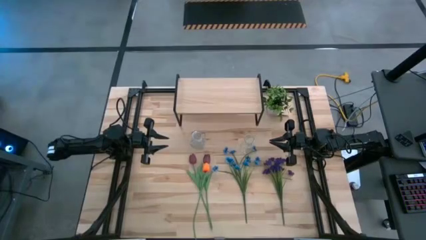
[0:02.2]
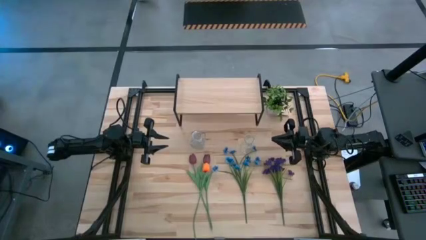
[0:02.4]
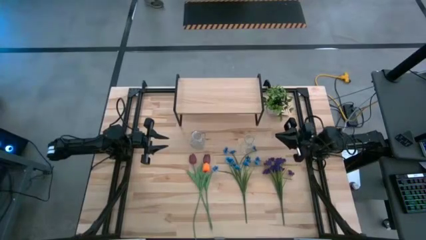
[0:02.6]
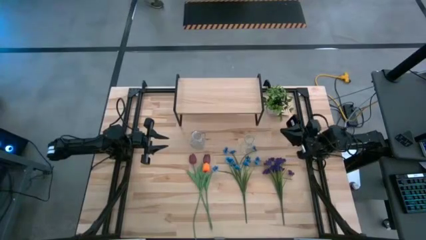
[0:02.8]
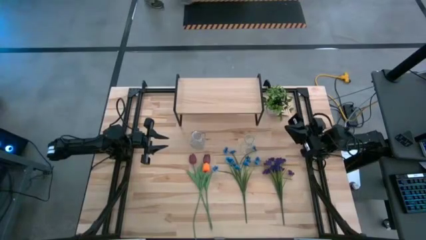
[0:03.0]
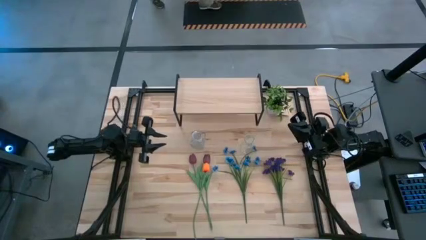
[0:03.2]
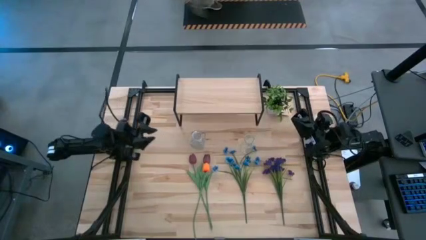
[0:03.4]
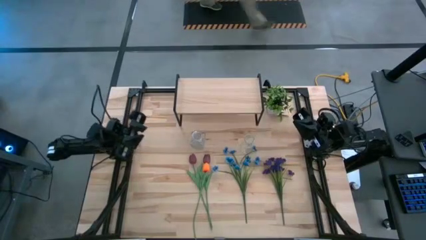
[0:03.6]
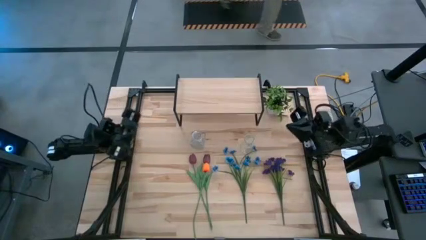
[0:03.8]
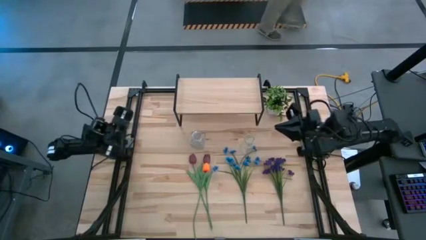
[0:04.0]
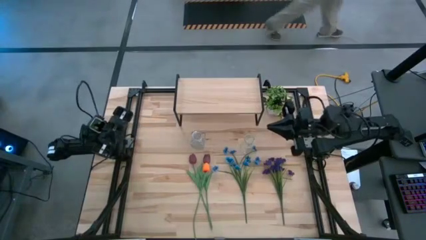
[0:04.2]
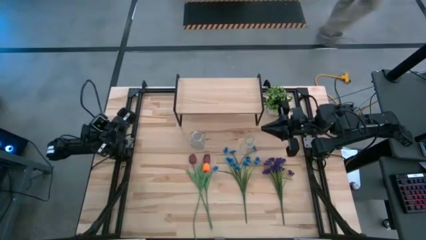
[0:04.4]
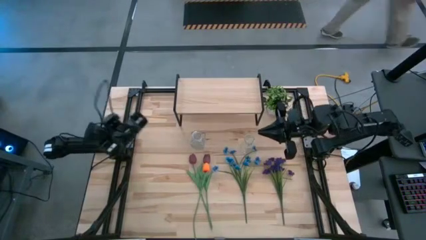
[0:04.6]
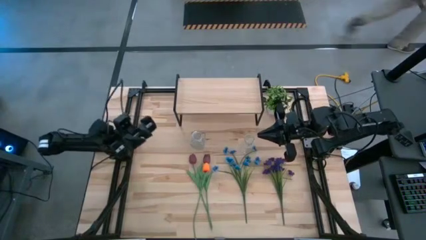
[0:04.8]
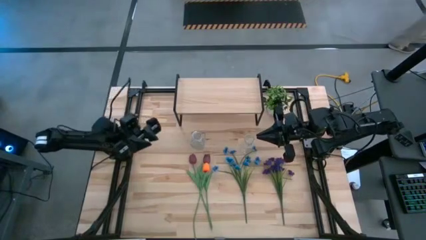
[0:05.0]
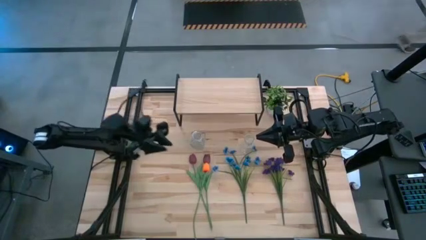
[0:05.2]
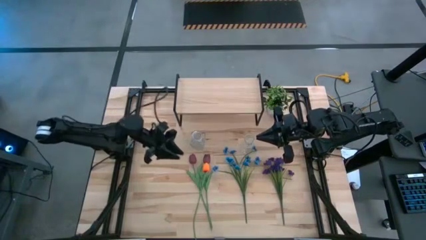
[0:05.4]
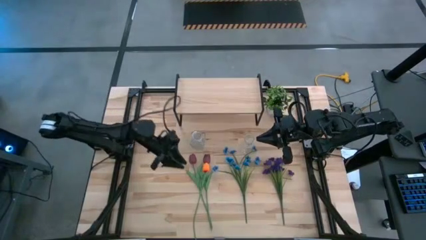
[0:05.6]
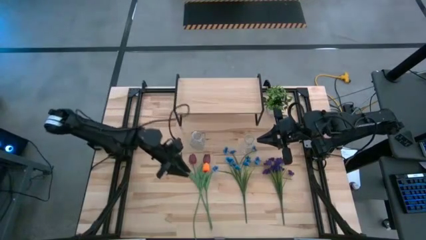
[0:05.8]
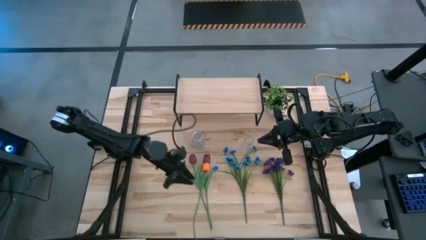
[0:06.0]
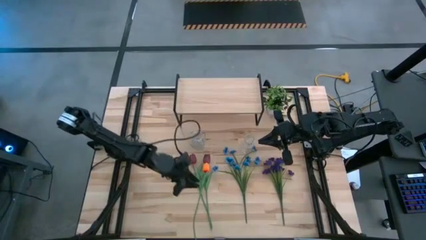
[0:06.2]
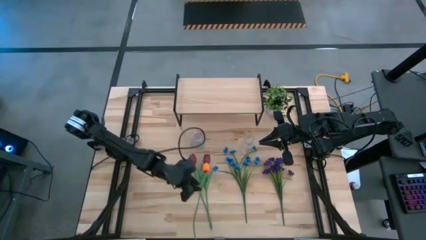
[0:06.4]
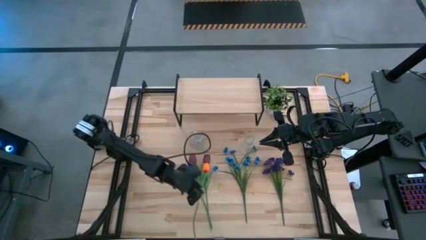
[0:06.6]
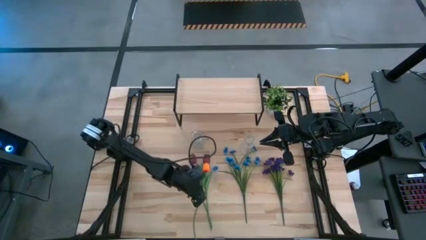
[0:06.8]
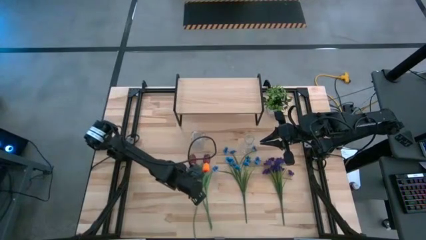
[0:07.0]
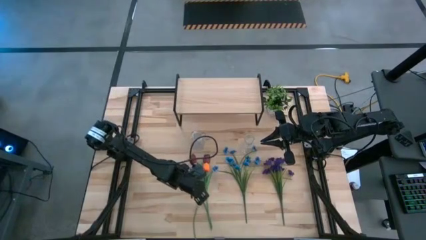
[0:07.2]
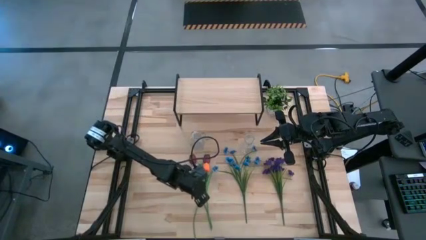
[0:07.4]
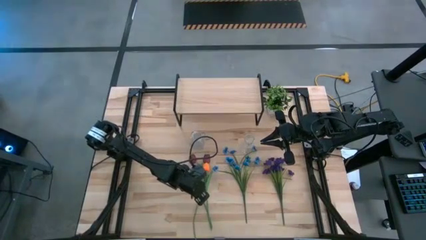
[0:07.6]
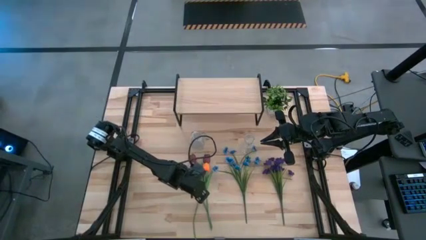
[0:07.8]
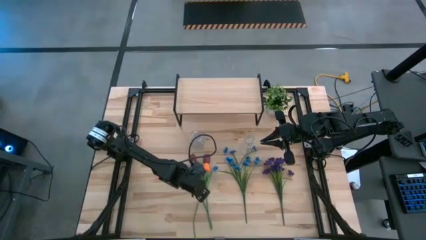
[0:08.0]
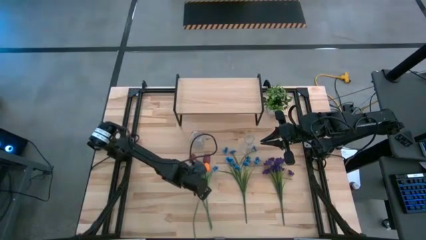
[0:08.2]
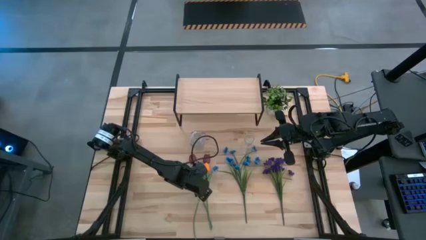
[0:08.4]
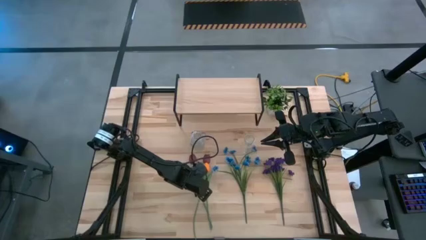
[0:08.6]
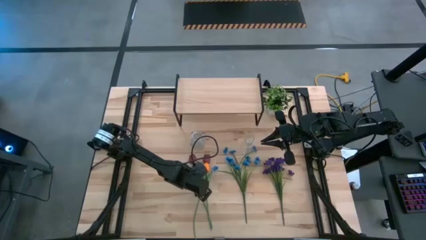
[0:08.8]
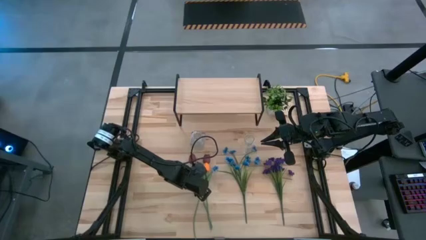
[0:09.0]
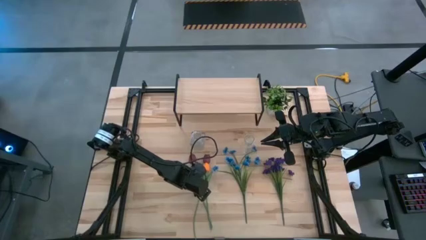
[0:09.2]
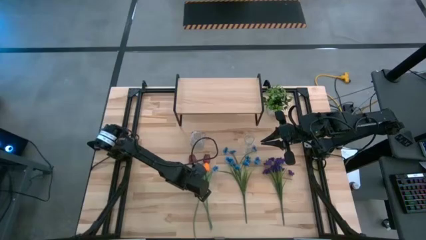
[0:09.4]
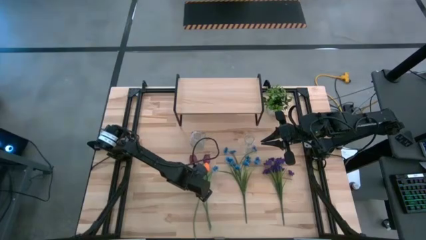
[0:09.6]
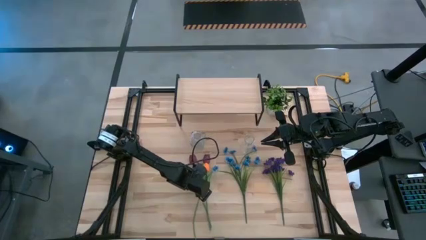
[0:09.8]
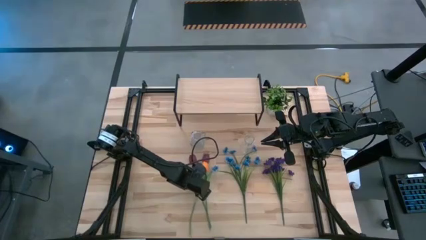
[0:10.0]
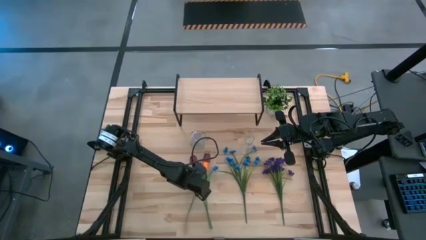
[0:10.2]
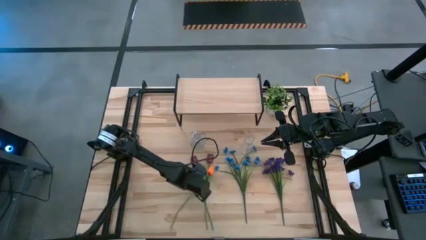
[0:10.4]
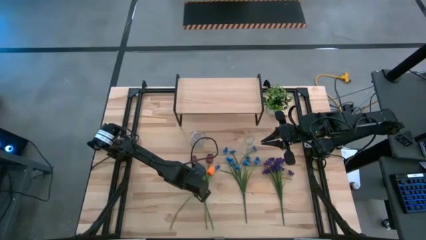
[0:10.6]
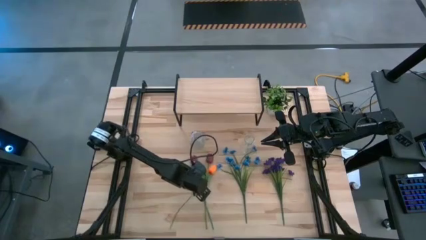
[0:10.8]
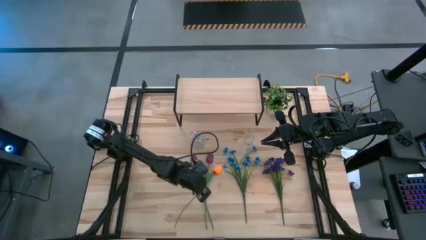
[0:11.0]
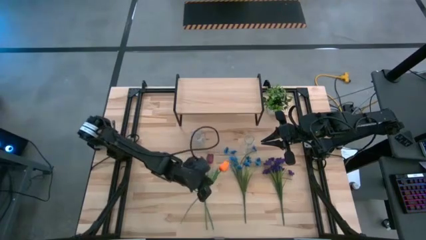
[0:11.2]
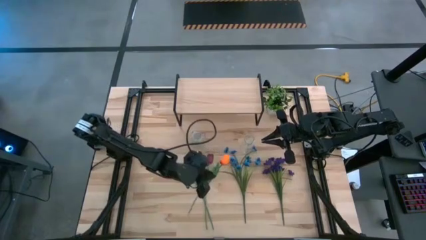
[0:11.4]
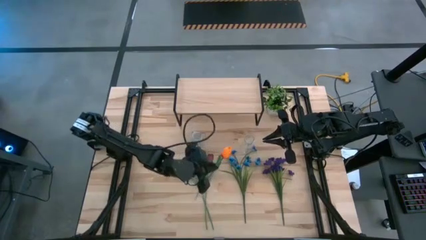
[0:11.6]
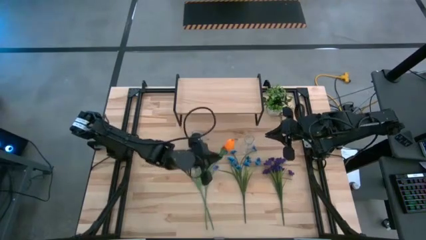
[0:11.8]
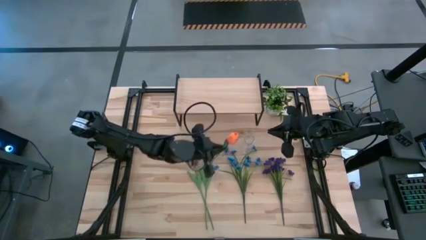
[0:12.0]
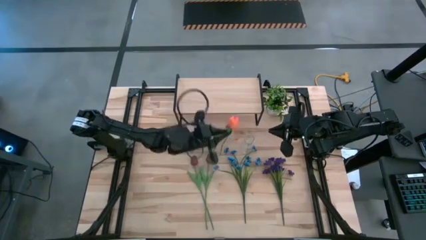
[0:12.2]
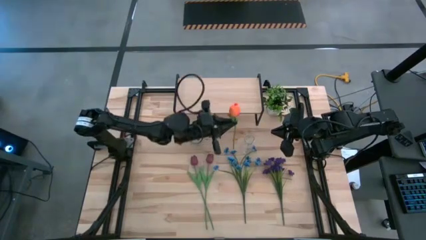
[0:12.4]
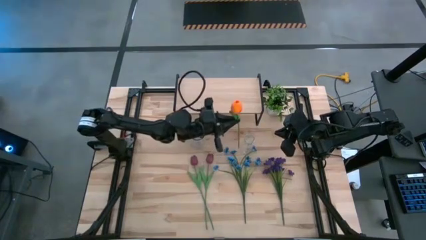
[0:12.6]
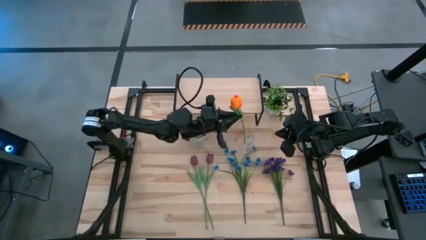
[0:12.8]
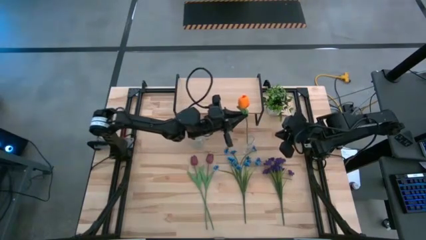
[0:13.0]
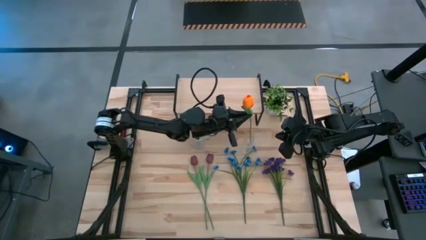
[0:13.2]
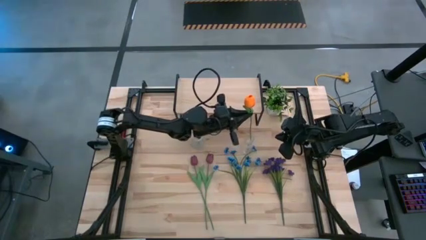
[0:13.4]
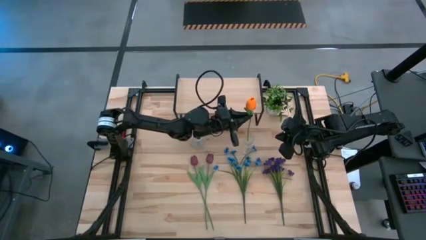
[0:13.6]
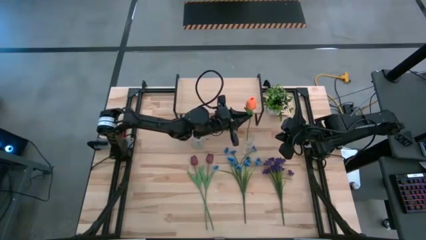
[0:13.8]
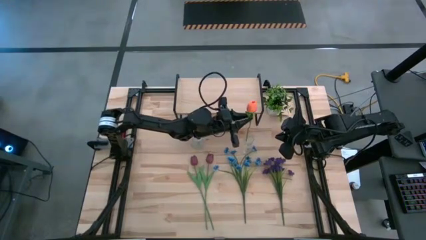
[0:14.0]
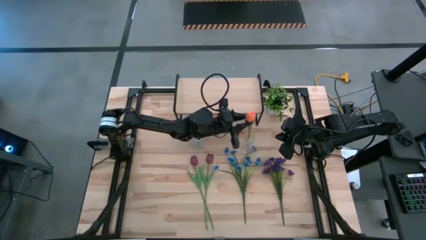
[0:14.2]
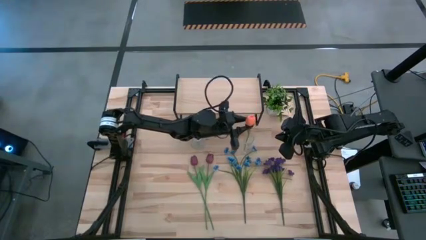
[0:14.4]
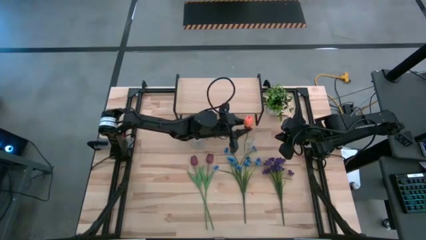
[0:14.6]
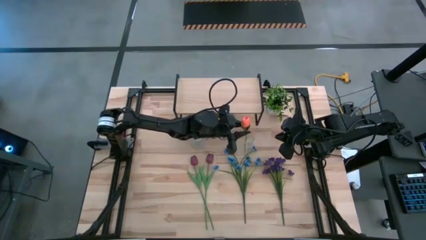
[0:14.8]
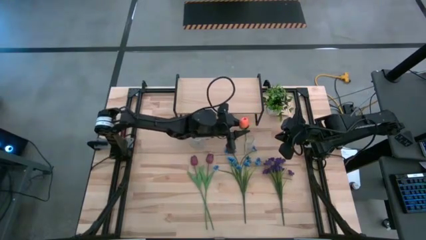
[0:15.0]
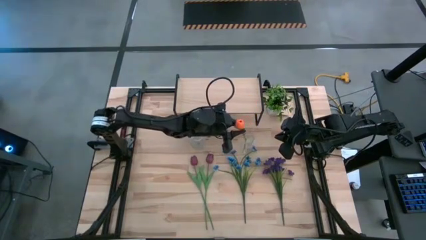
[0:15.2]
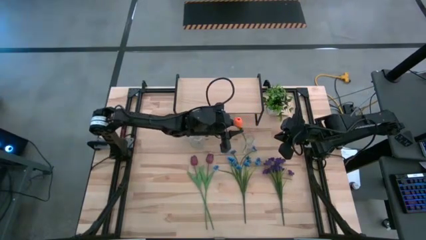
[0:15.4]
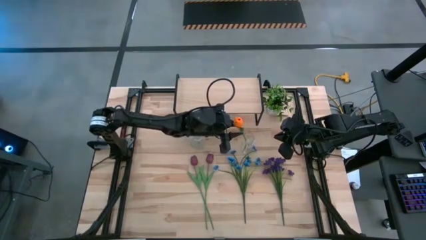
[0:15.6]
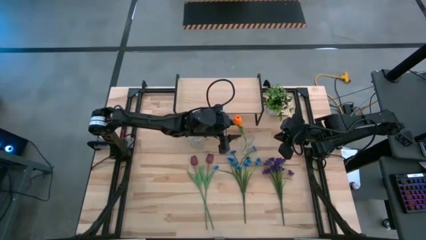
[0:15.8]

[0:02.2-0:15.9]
Task: Pick and place flowers into a vace then onto a shelf
Put the orange flower into the right transparent vase
